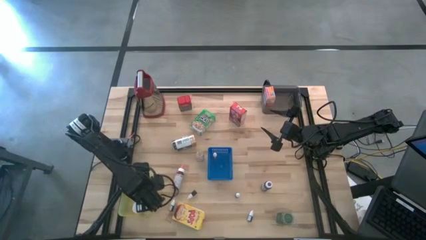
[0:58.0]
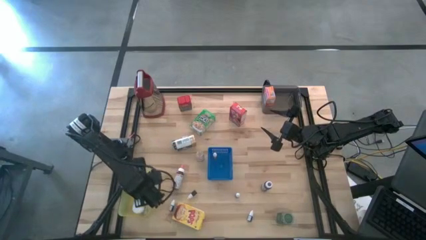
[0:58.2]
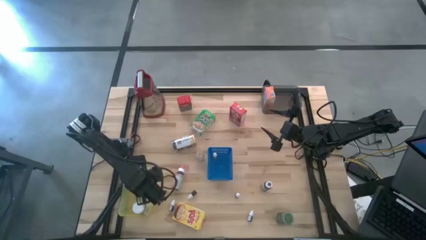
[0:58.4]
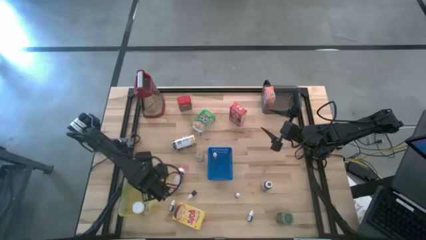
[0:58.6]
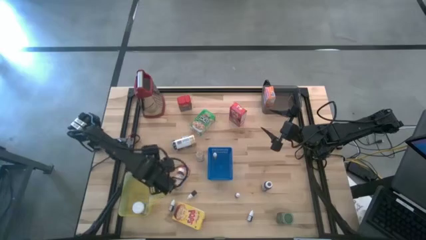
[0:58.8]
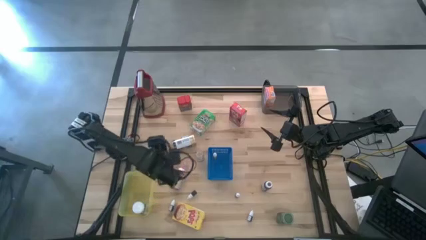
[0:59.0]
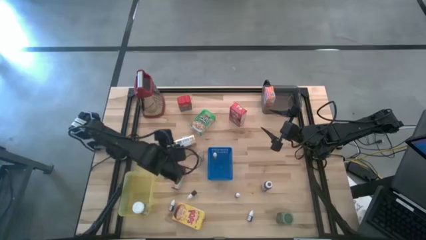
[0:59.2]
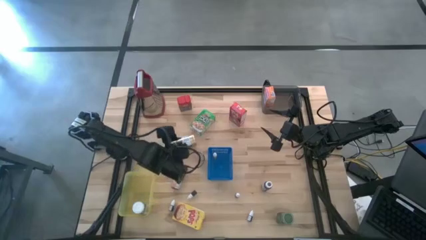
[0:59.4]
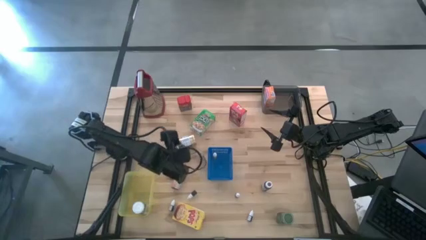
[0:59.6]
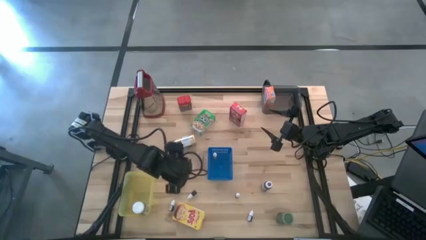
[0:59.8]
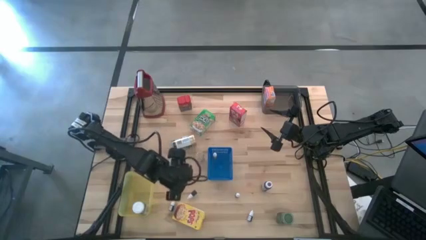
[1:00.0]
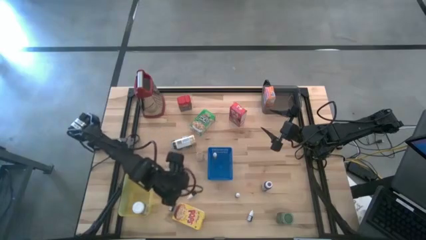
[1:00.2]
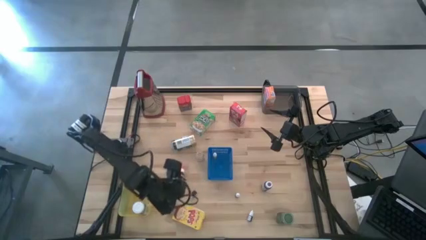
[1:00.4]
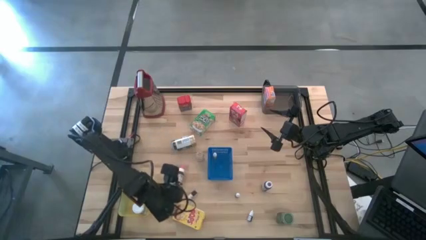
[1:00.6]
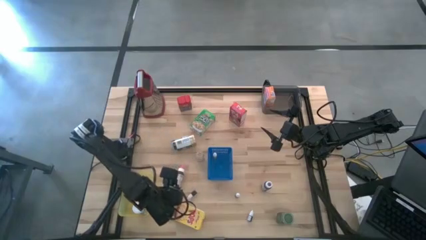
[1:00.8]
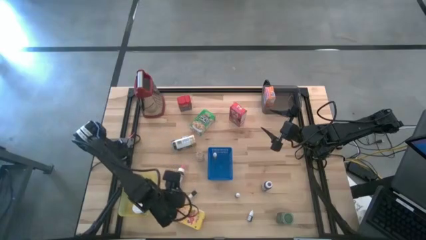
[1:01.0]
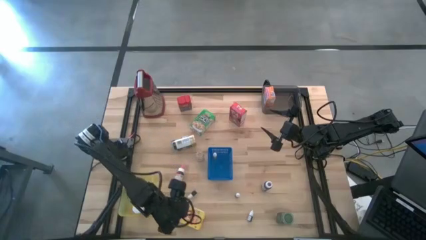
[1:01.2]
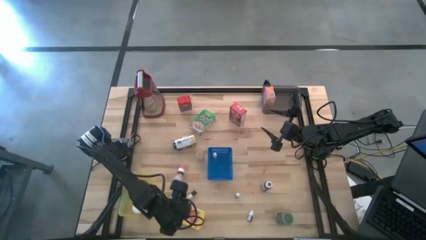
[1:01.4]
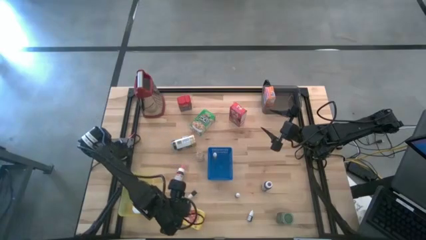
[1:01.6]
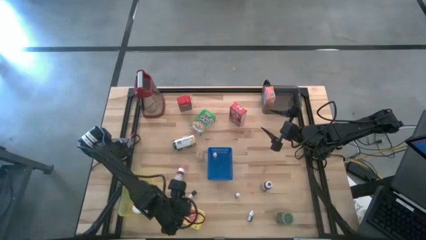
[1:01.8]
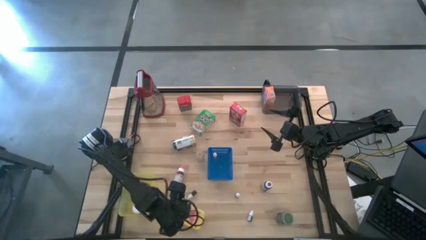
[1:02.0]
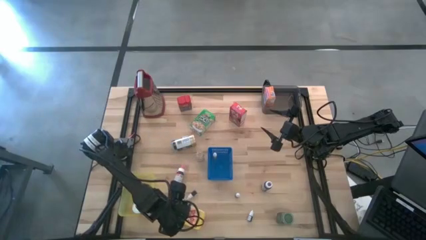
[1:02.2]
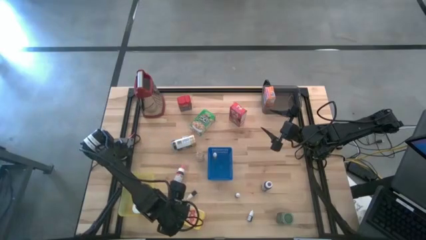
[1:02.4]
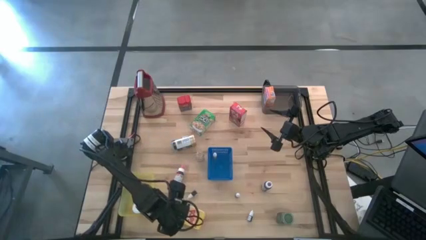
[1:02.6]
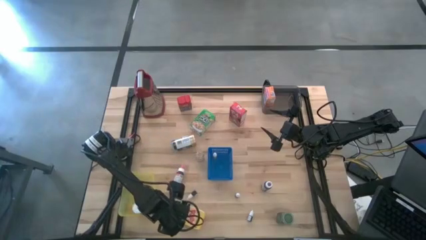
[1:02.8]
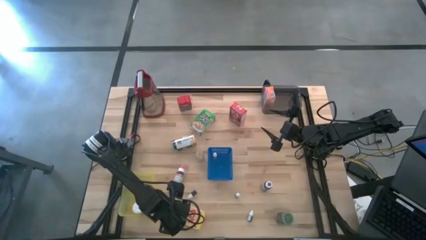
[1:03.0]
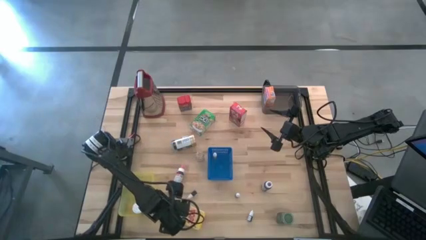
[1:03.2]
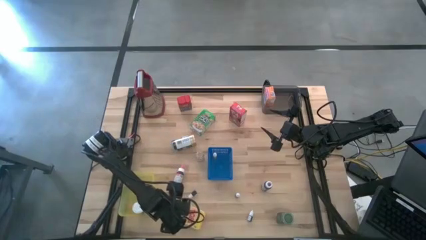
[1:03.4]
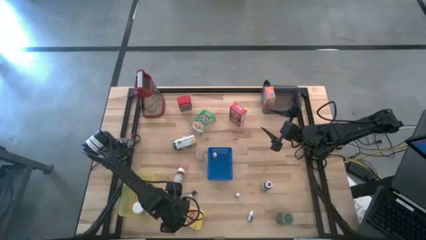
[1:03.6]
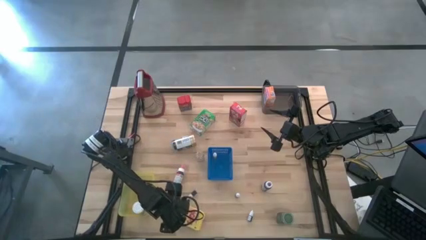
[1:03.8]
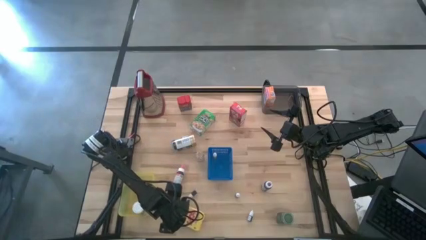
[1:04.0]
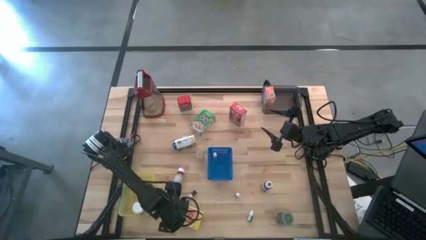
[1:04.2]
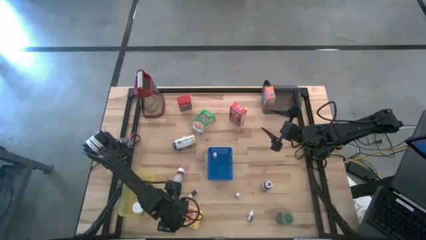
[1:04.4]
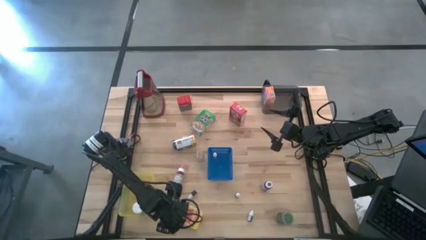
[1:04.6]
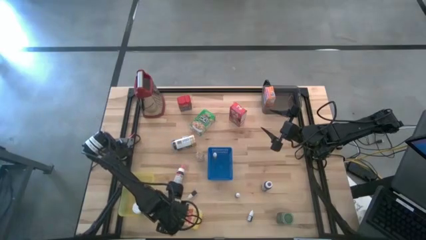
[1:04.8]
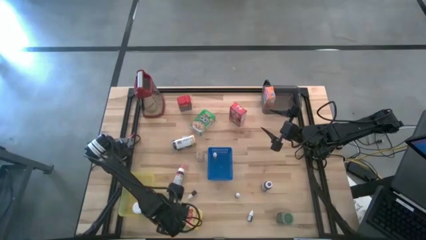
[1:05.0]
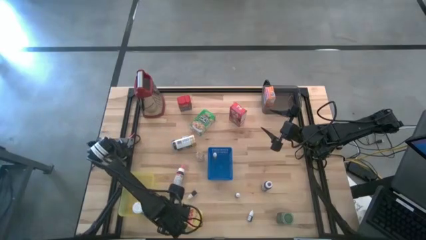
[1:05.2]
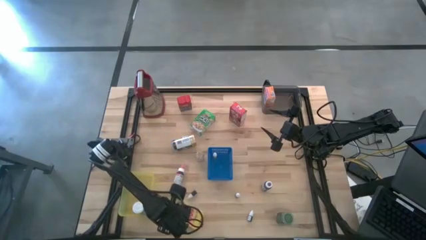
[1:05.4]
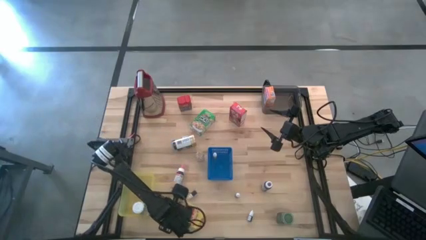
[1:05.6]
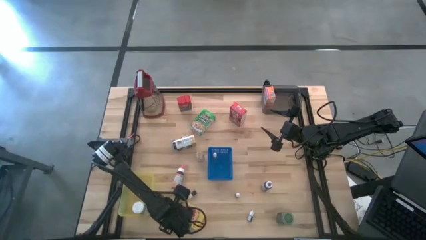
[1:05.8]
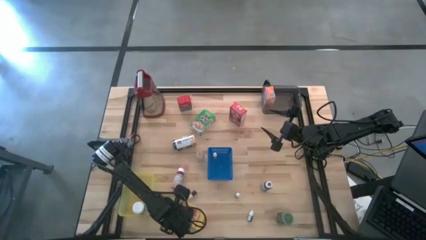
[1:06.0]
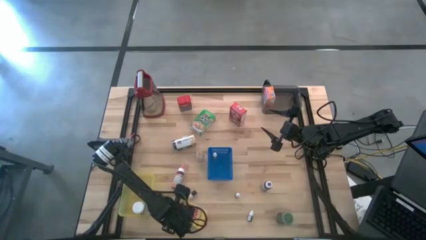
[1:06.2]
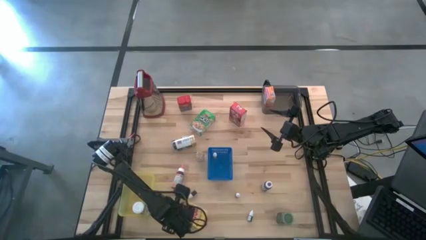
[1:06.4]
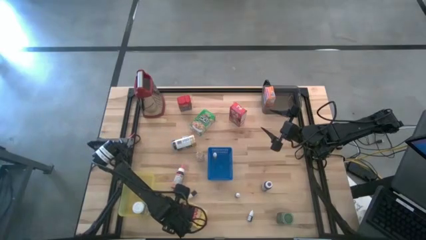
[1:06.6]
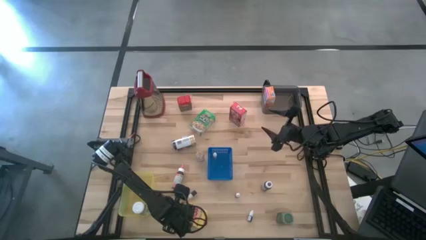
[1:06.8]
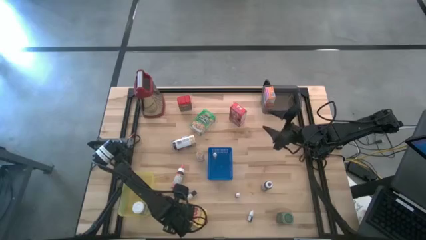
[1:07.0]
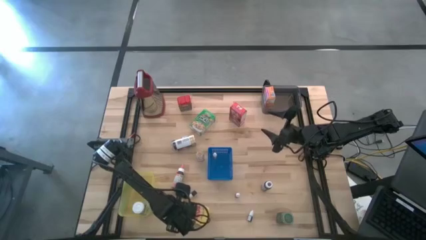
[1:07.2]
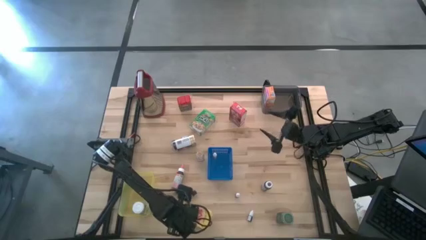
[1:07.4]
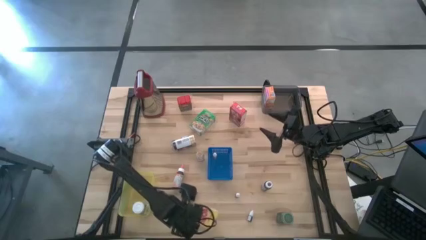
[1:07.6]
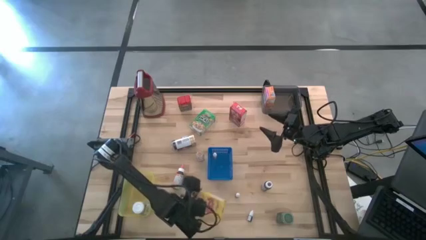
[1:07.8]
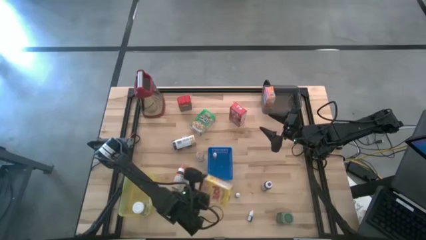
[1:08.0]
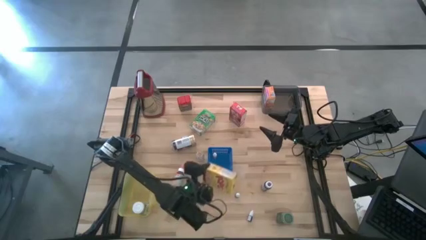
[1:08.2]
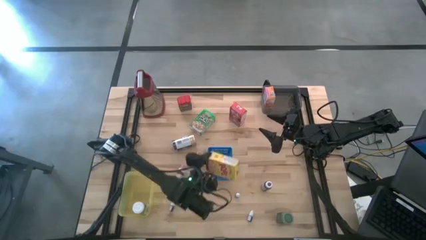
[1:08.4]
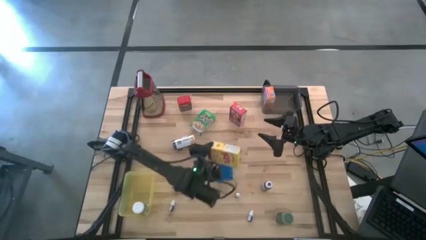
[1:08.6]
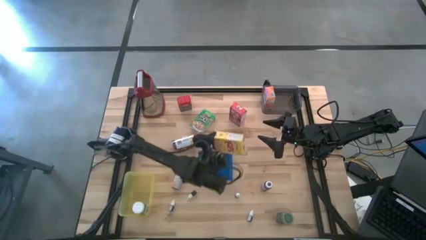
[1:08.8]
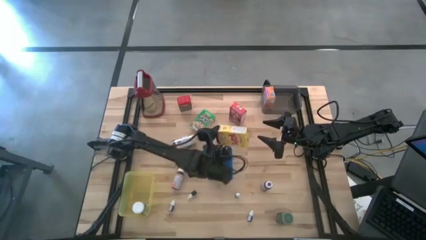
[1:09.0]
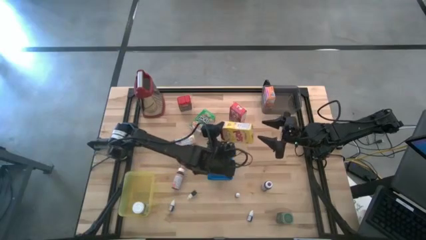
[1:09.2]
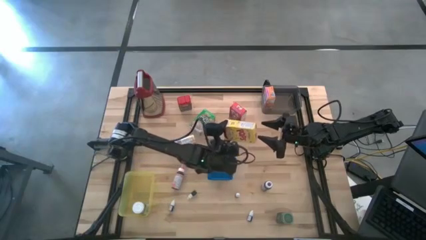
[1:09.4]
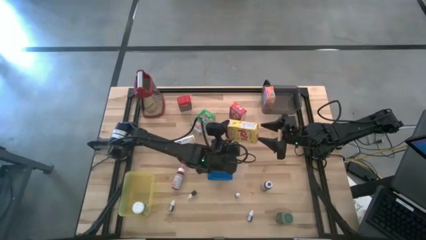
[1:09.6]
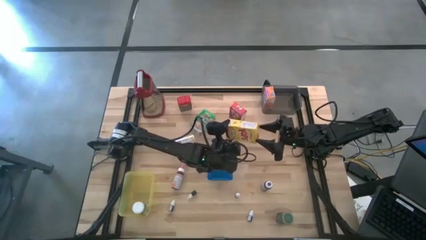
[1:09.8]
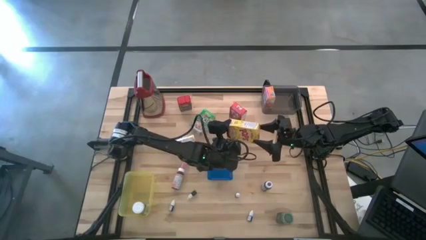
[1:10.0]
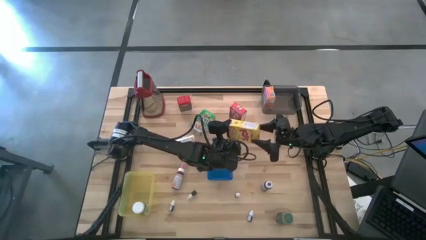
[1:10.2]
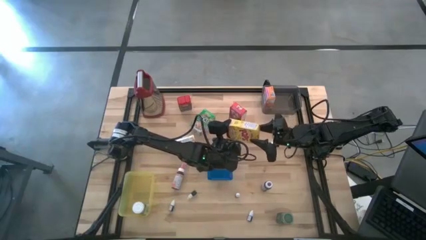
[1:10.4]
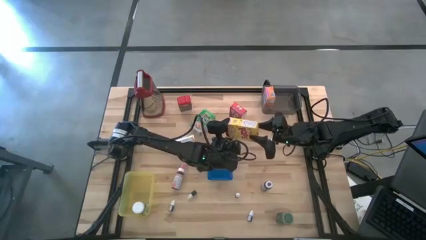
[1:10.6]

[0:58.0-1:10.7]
Task: Pick & Place Kitchen Items
Put the yellow cereal box into the black bin
